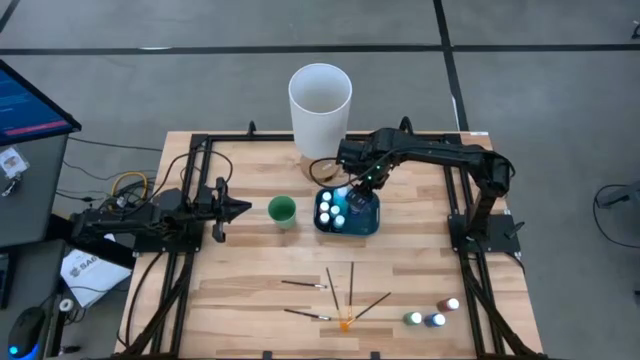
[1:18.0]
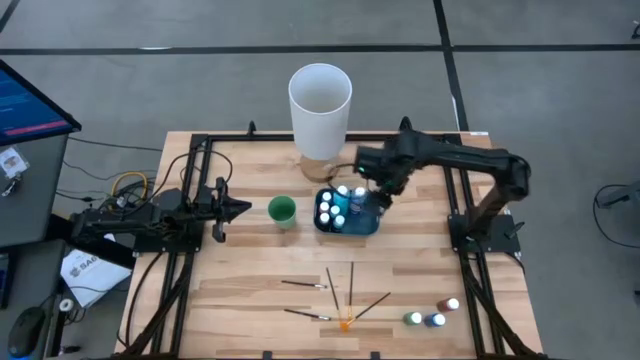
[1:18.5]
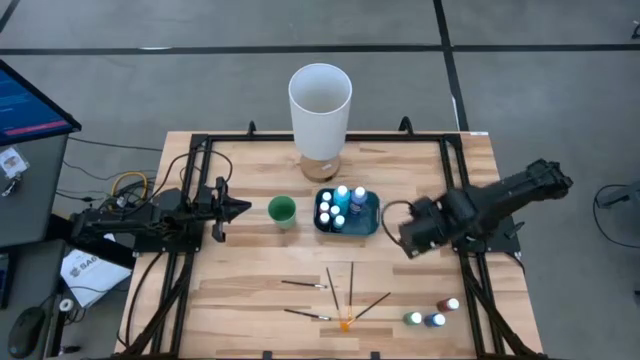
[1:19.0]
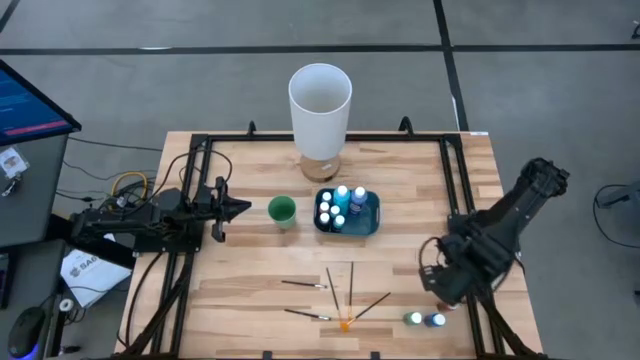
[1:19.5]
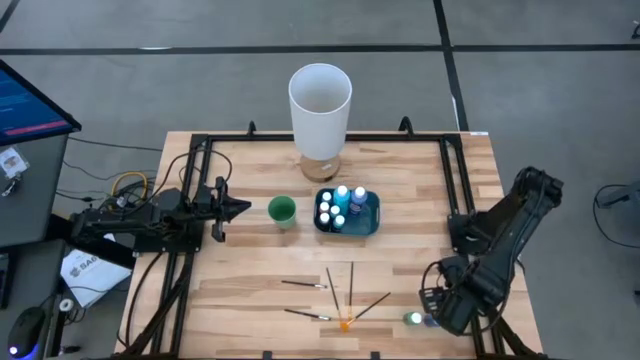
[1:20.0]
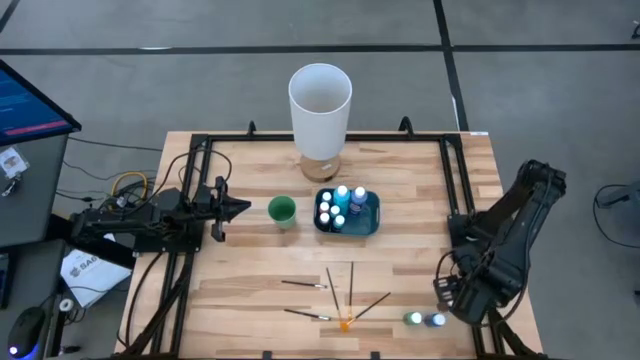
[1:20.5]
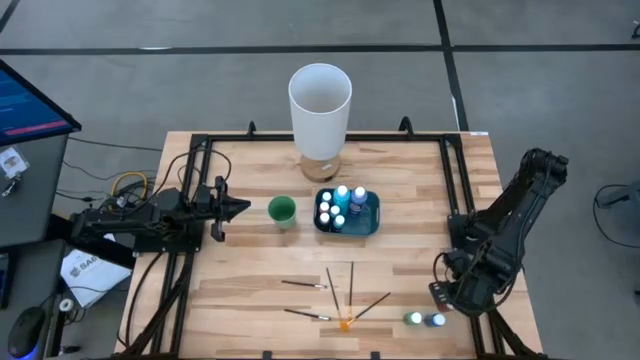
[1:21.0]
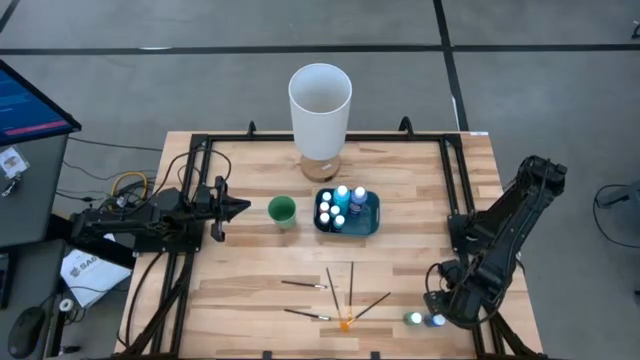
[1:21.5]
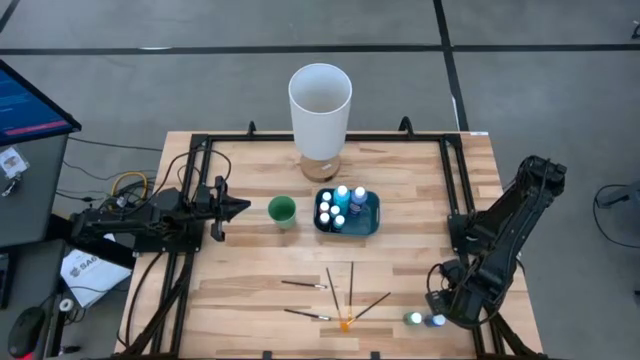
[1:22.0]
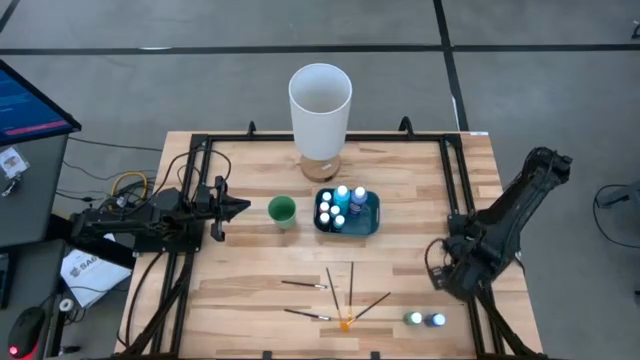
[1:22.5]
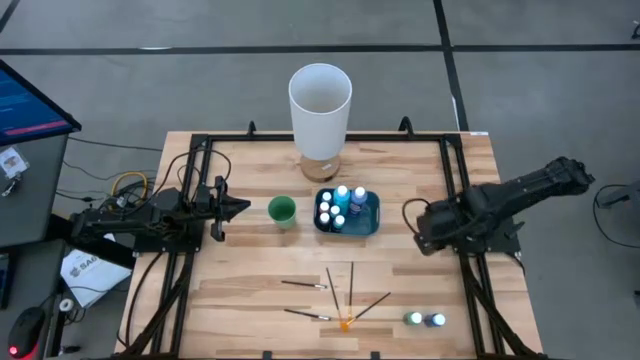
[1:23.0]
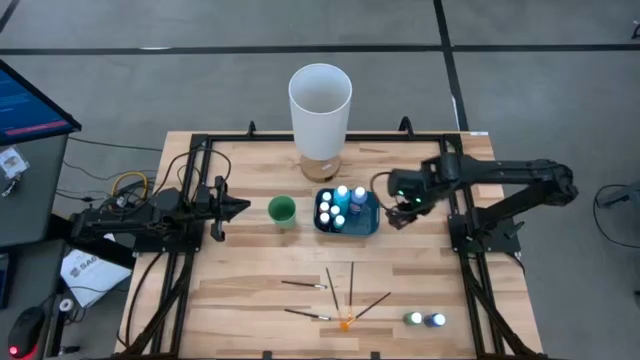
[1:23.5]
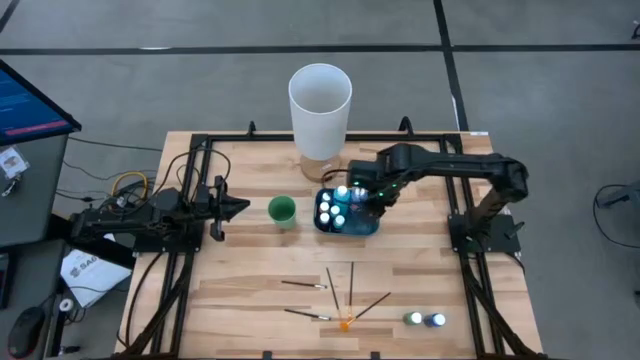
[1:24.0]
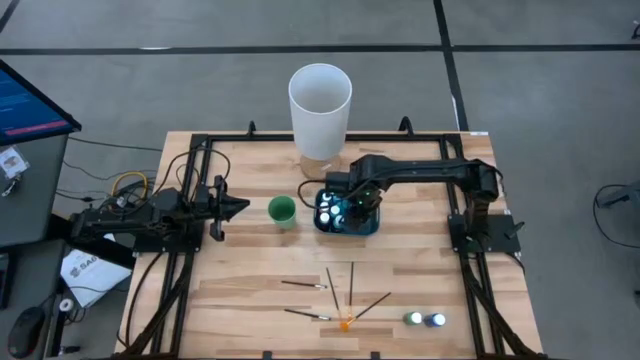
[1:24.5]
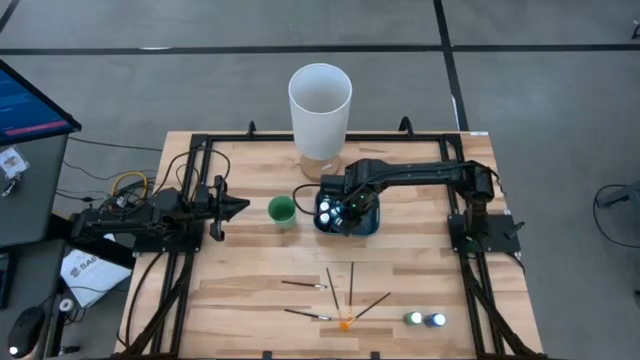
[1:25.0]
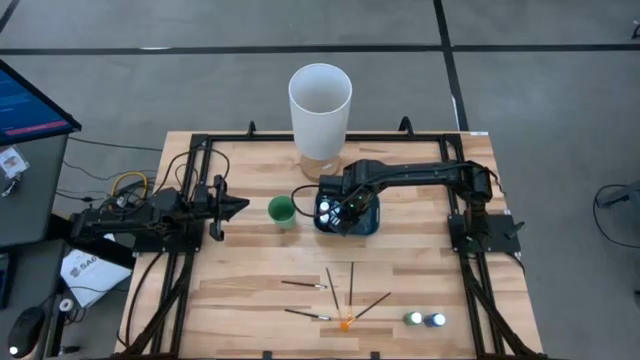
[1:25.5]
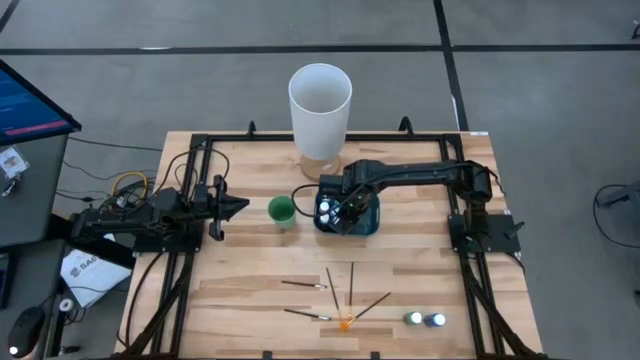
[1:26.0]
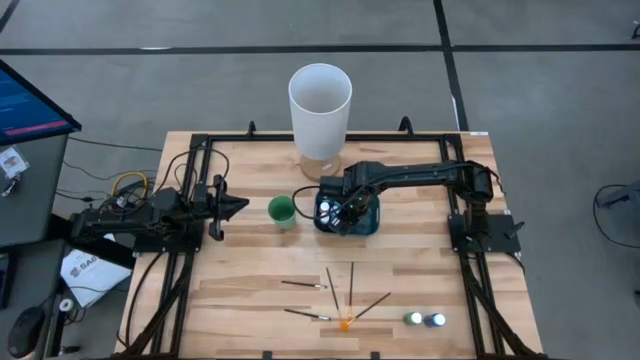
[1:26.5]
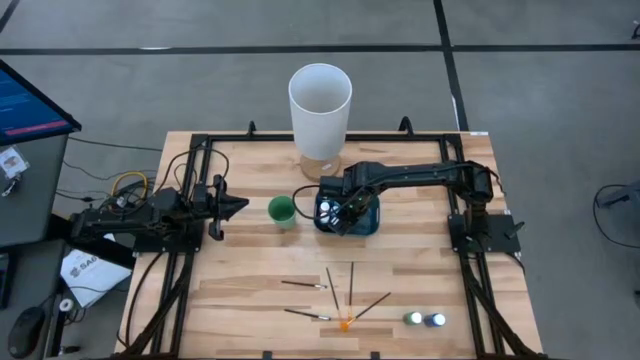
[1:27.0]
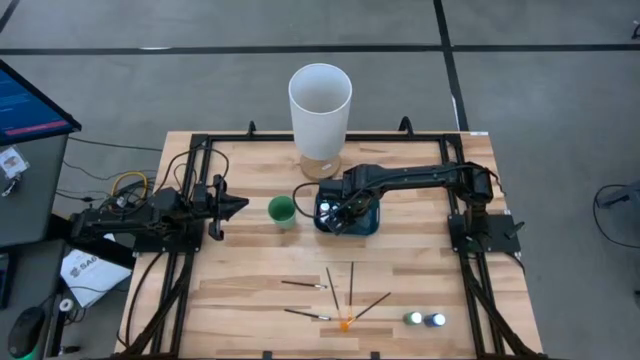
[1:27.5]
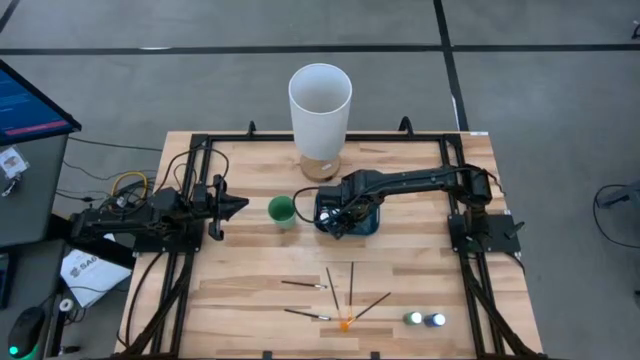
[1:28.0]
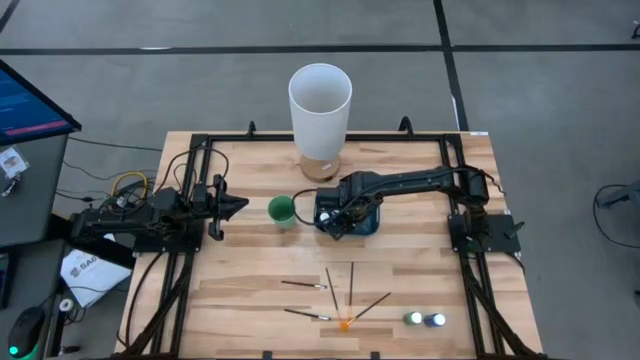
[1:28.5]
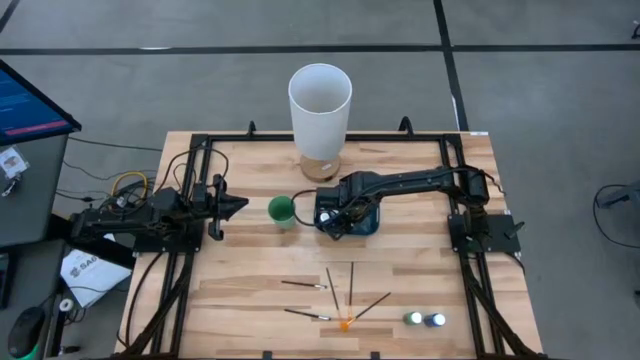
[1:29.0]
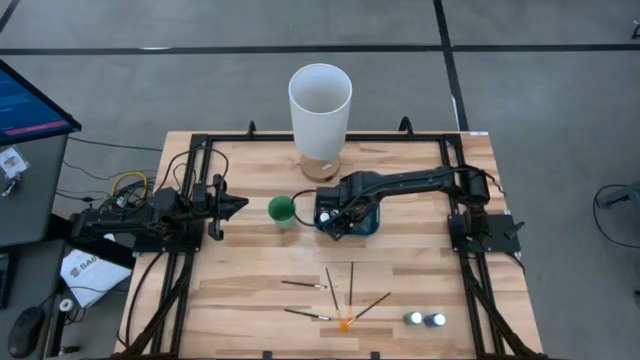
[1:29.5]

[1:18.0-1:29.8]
Task: Pick & Place Paint Supplies
Put the small red paint bottle into the green bin

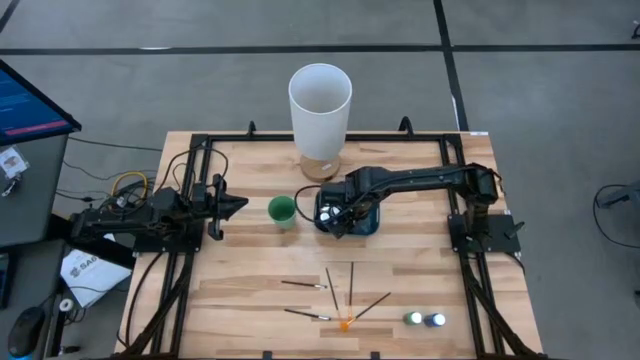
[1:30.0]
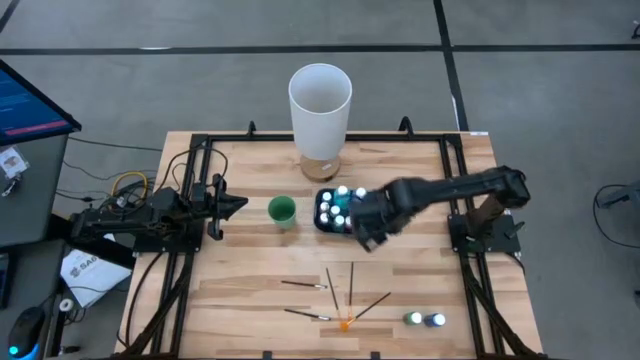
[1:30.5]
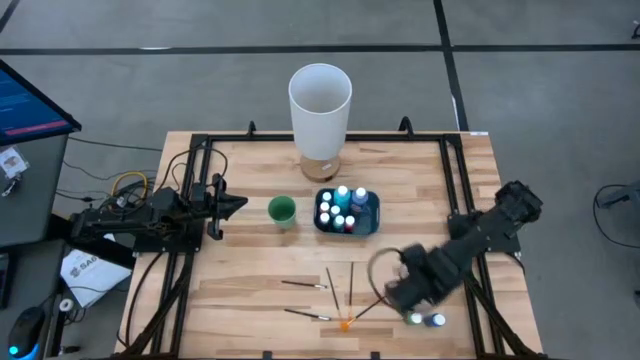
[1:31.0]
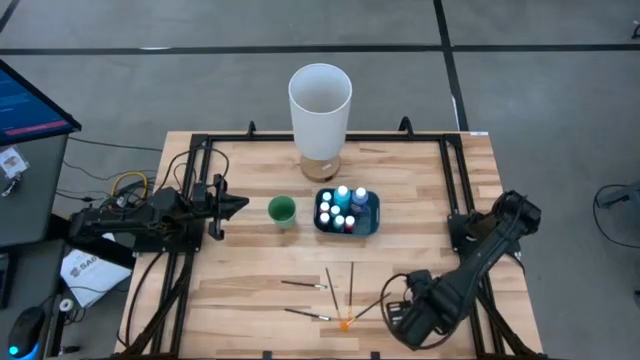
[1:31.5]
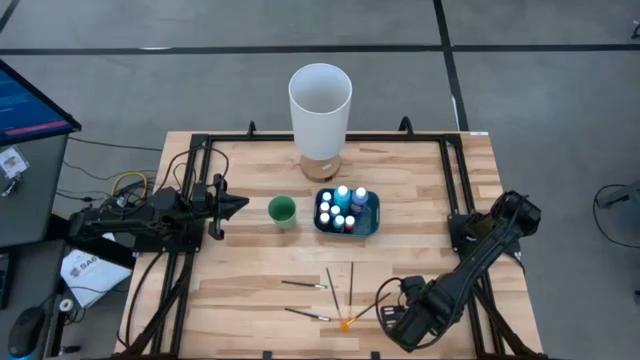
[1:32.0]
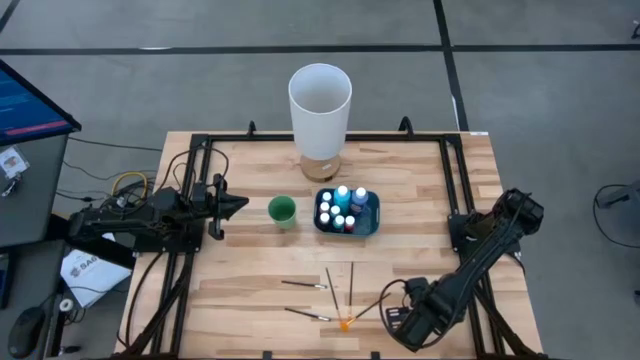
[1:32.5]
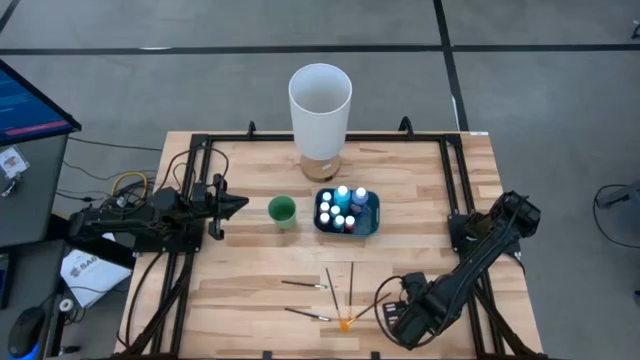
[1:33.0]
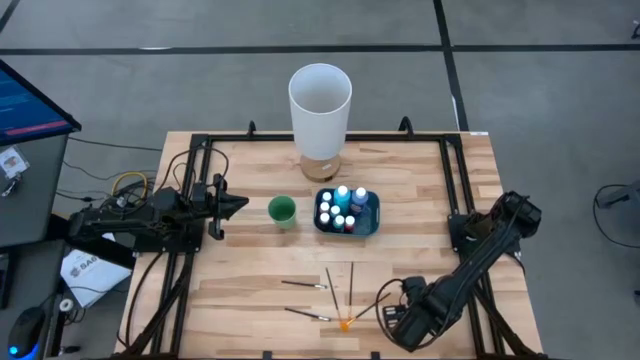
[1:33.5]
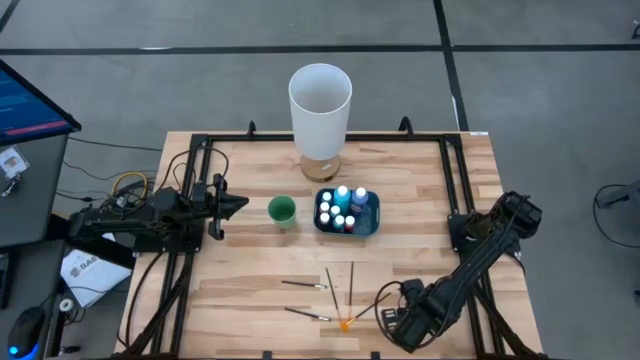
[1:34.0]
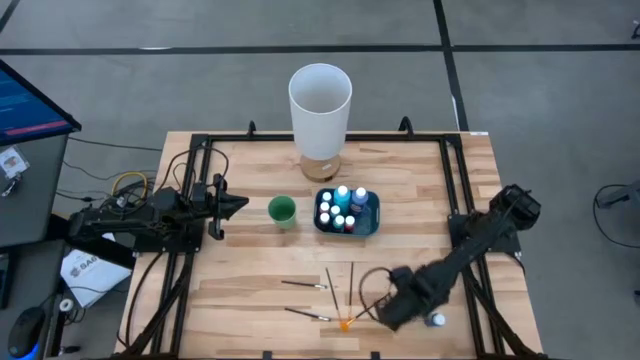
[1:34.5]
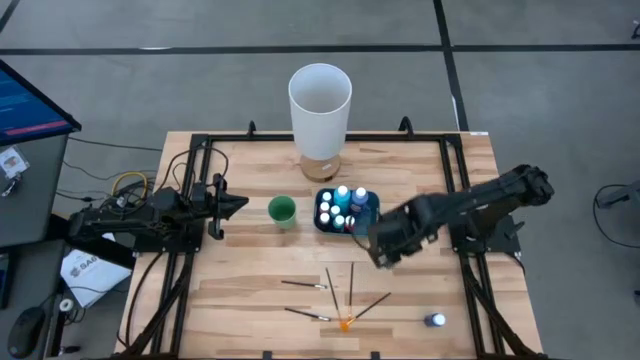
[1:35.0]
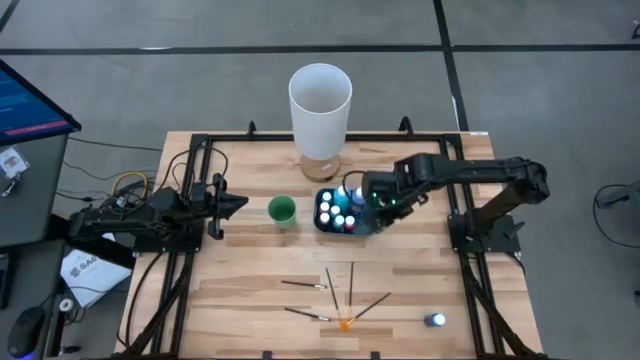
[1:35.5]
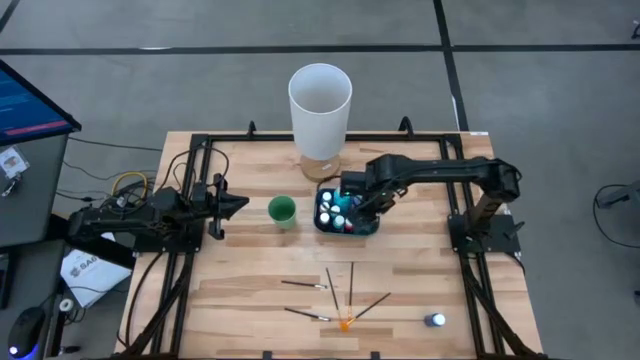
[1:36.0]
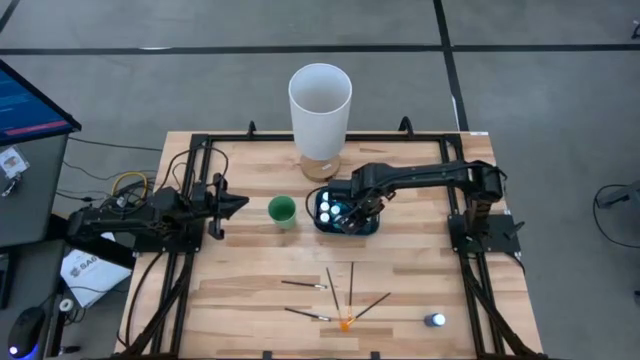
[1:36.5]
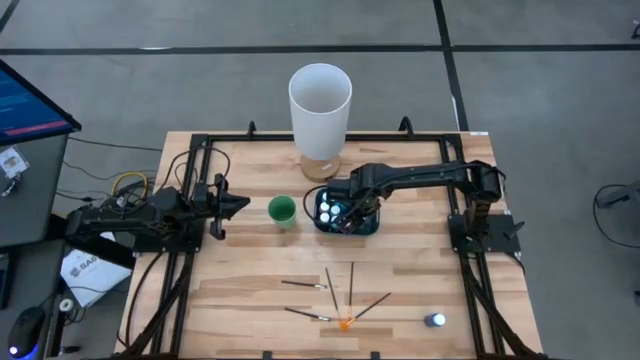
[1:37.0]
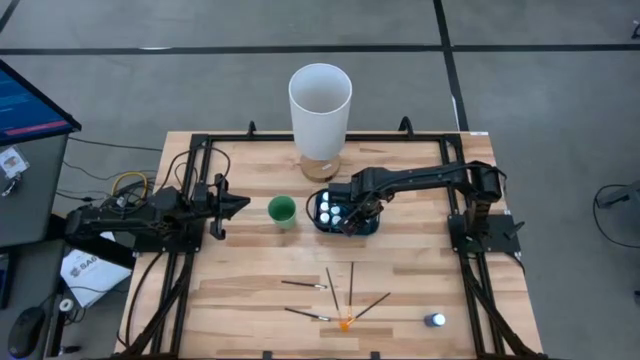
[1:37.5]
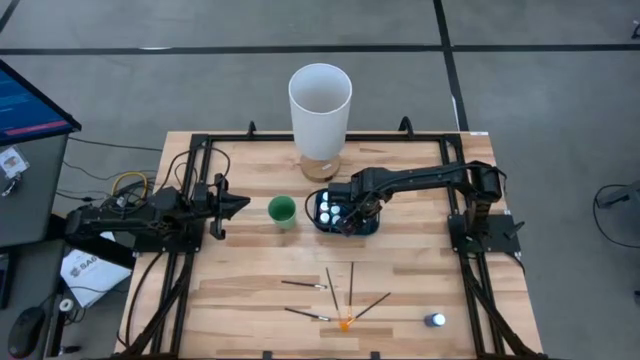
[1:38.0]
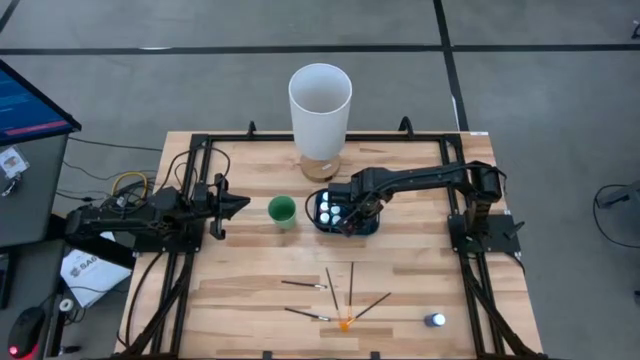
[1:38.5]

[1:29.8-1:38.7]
Put the small green paint bottle into the green bin

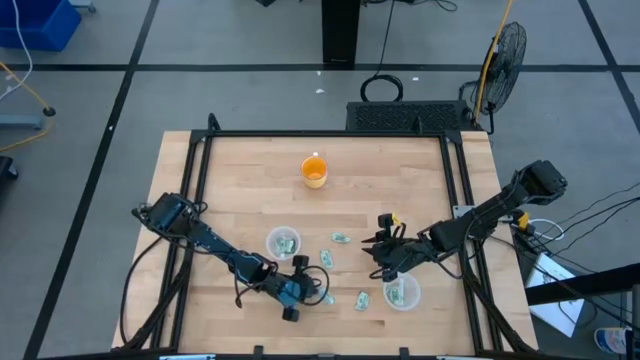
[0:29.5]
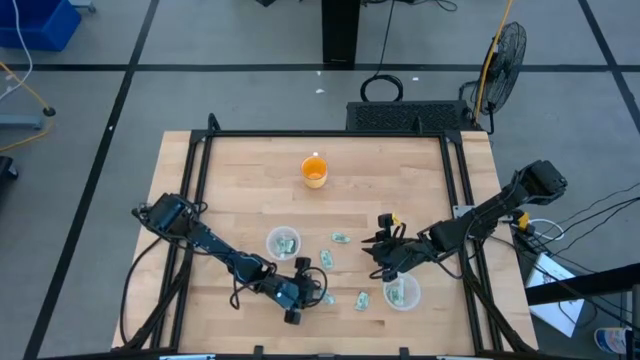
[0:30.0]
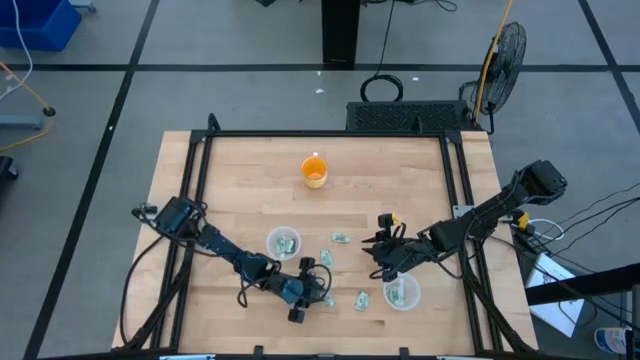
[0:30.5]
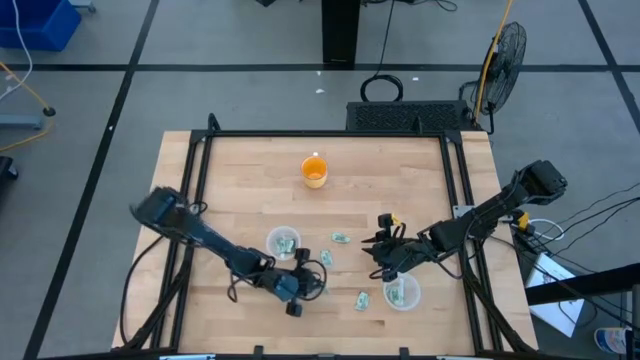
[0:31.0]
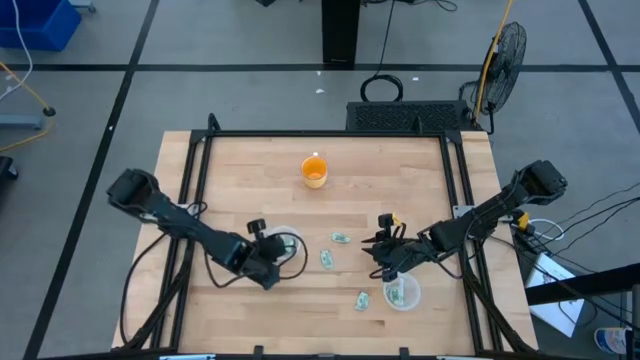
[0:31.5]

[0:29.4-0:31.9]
Task: Pick and place Stevia / Truvia into bins
Put the white stevia packet into the top transparent container
